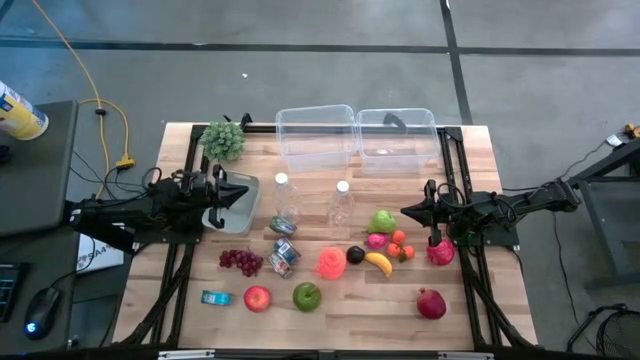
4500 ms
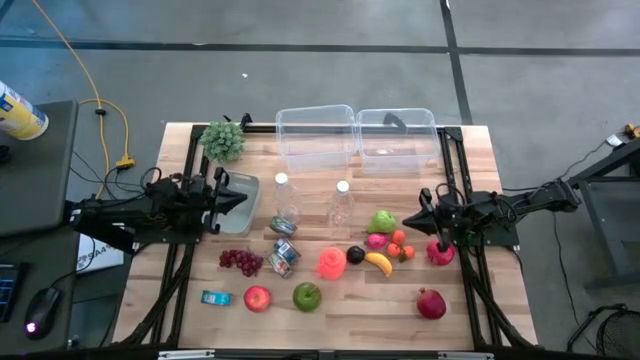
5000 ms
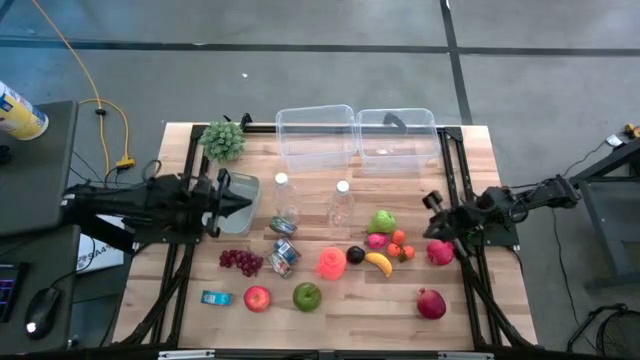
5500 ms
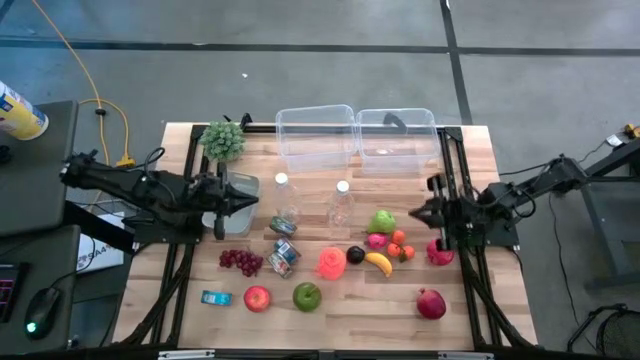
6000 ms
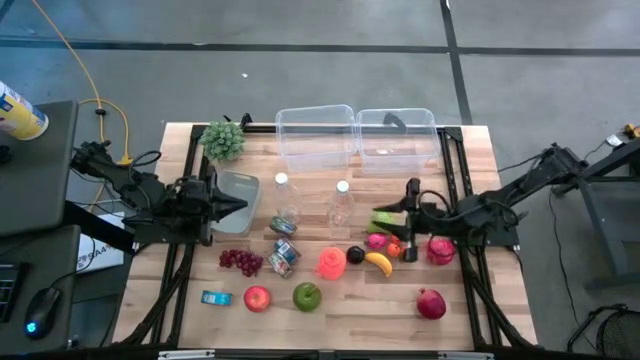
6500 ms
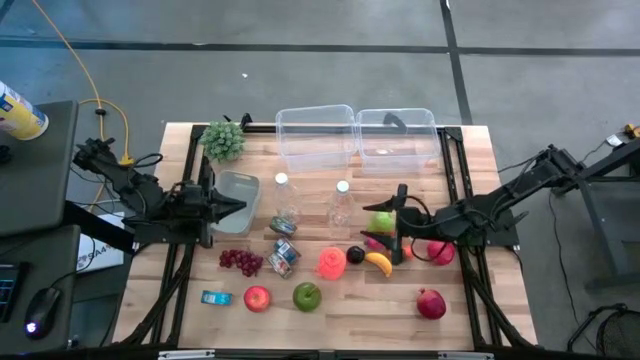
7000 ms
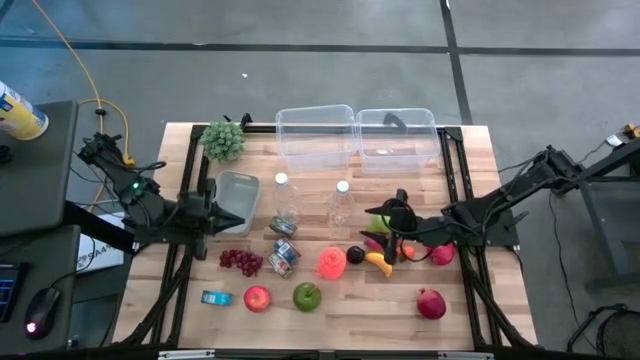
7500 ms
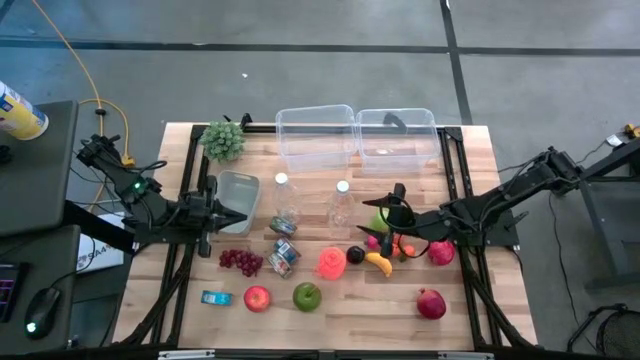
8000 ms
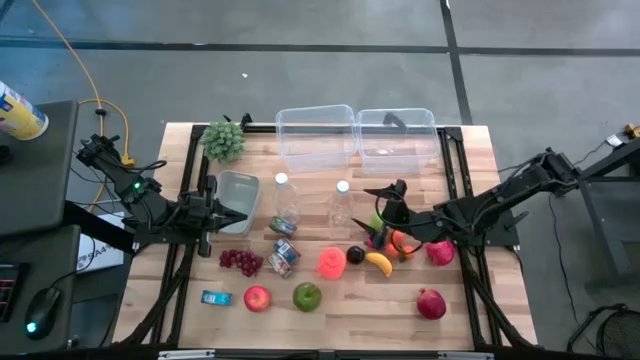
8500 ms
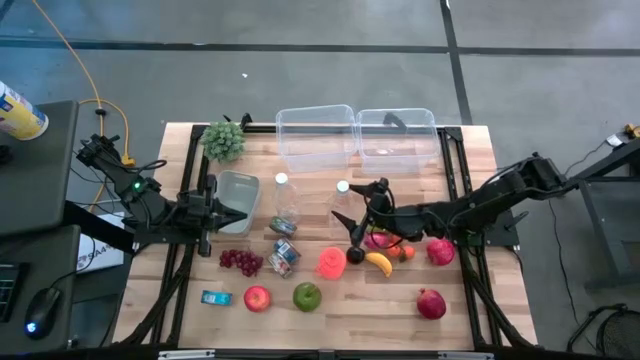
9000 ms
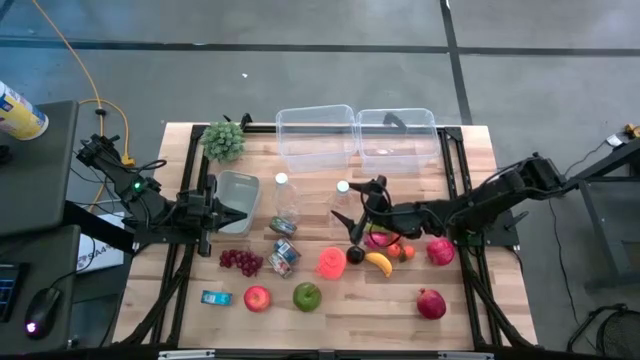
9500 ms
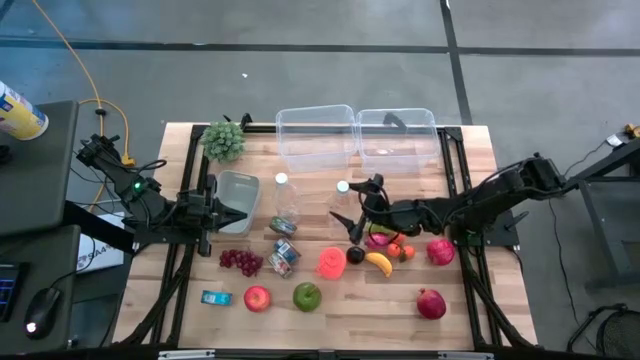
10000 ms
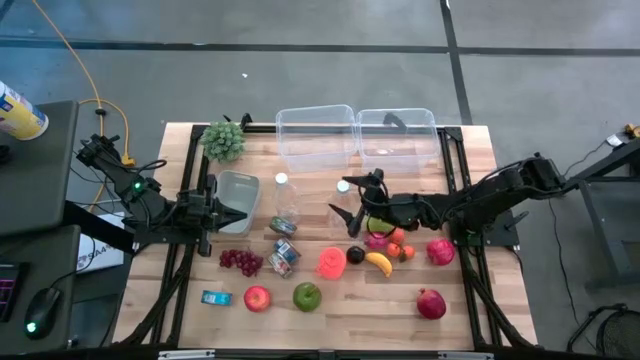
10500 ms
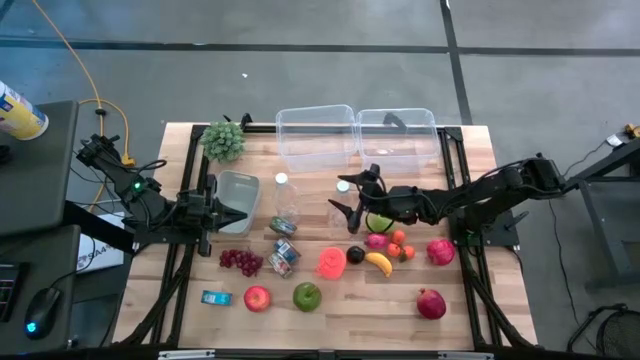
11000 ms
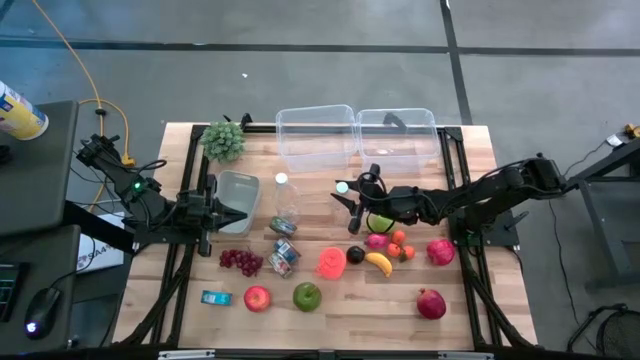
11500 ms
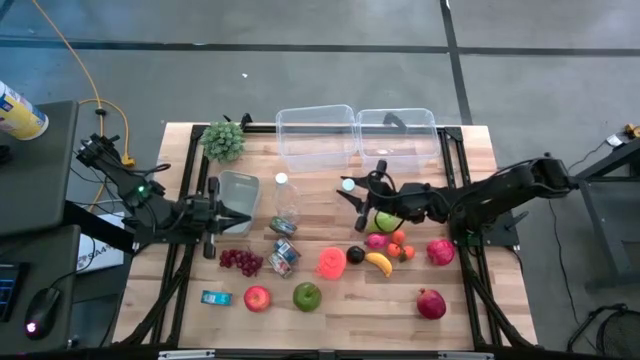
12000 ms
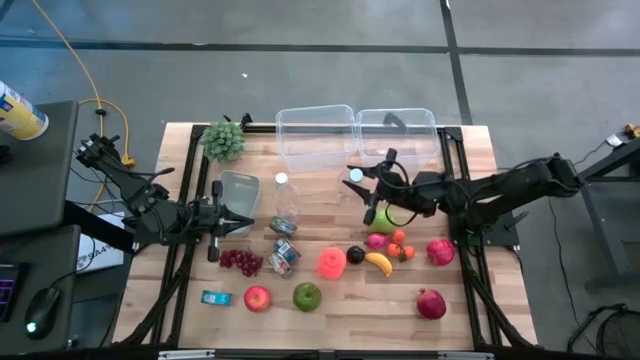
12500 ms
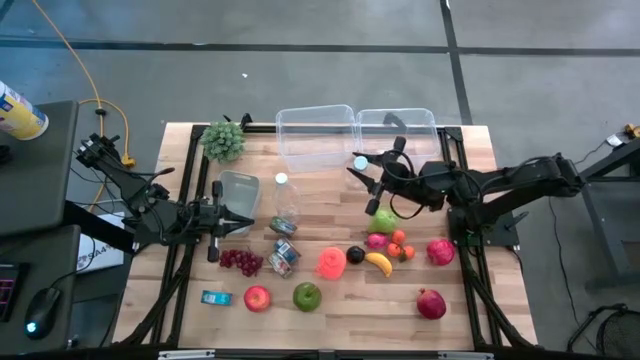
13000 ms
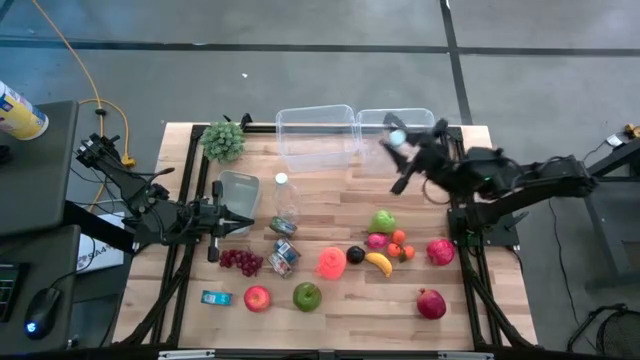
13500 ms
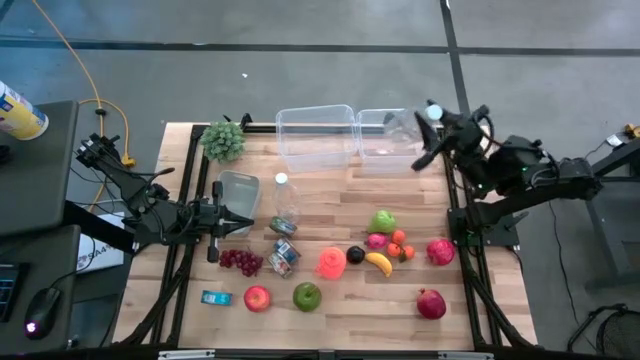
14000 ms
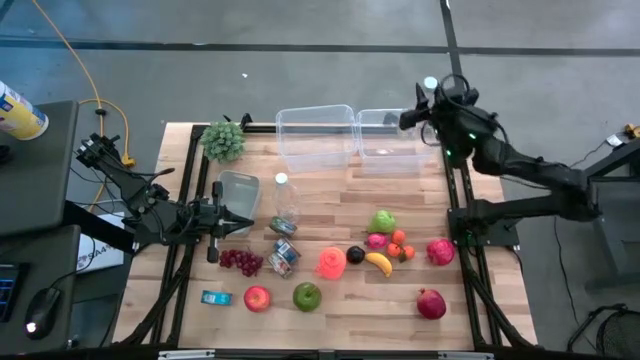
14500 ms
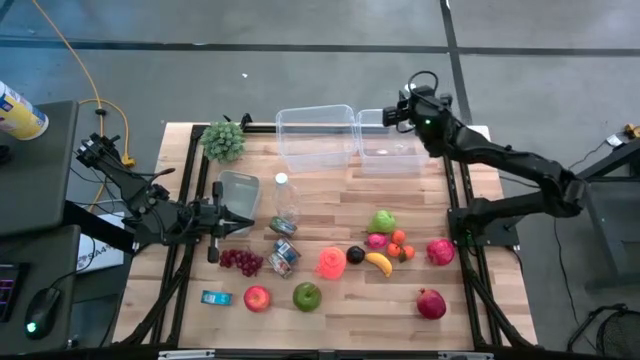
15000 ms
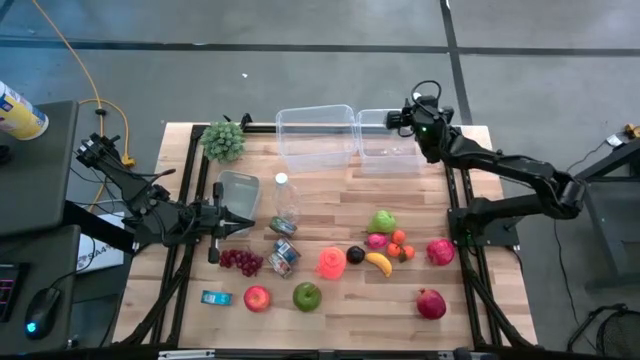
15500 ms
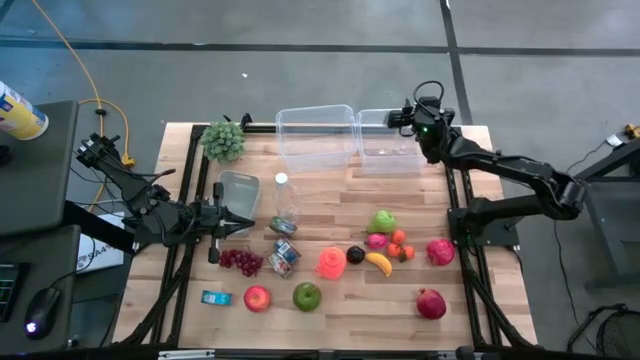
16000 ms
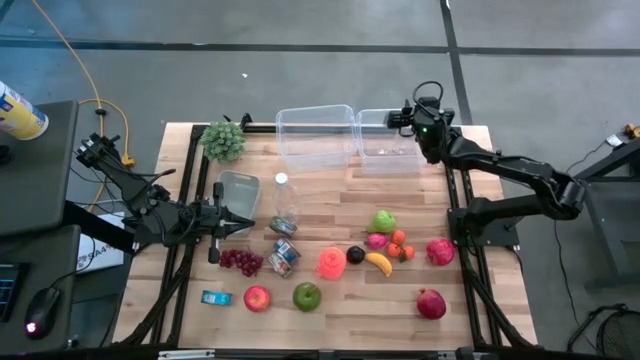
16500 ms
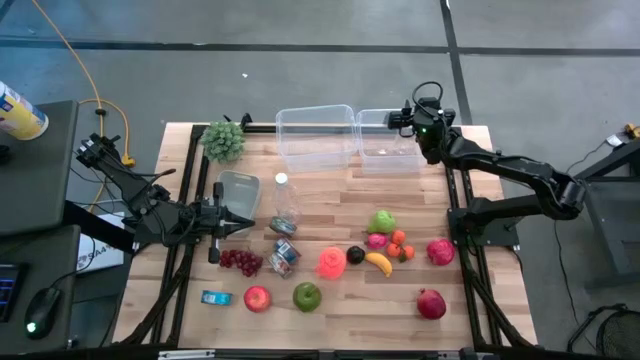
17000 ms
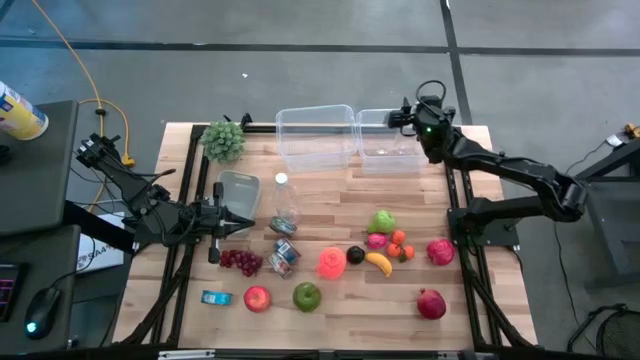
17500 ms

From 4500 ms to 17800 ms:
Task: Pick & Place Food Item
Put the right transparent bottle into the right transparent bin

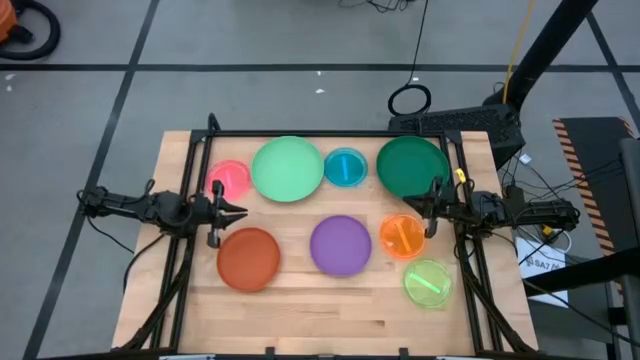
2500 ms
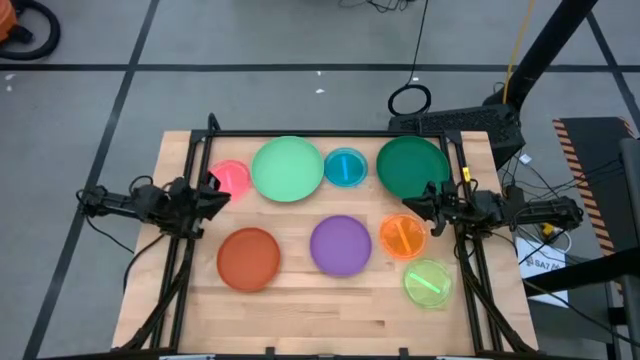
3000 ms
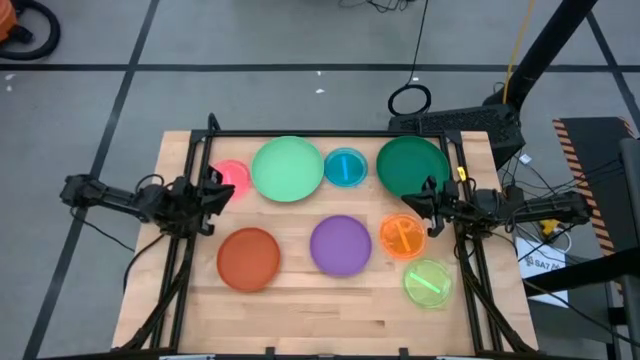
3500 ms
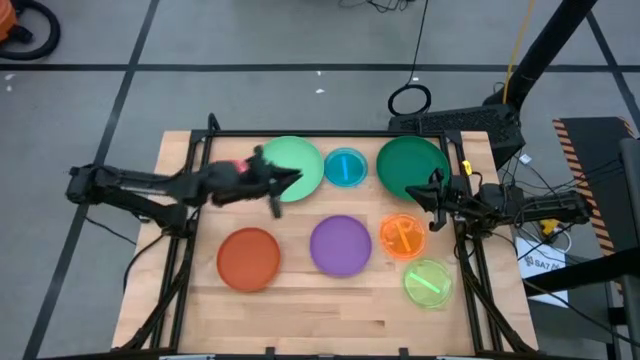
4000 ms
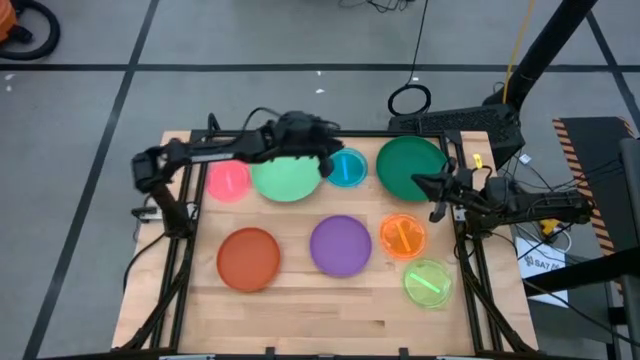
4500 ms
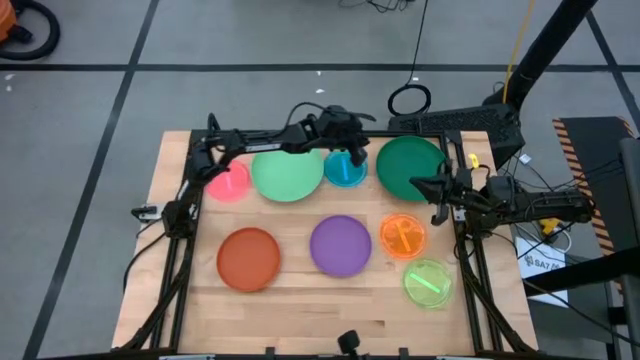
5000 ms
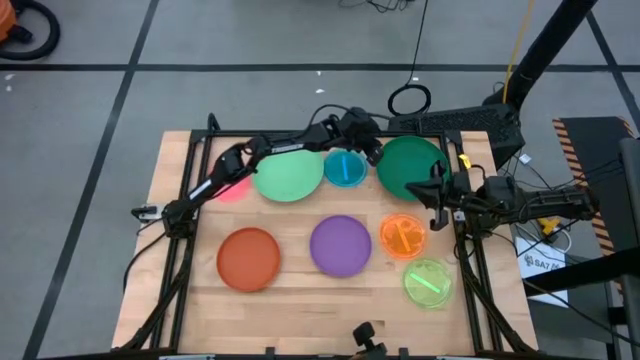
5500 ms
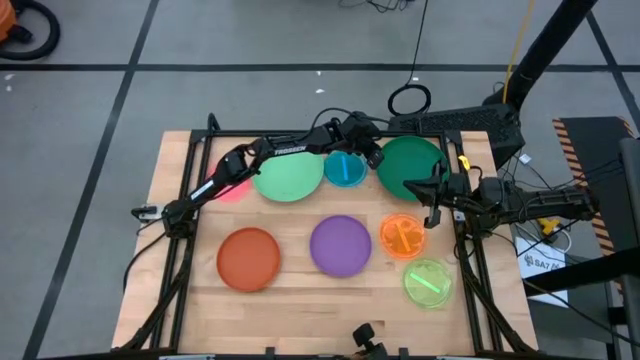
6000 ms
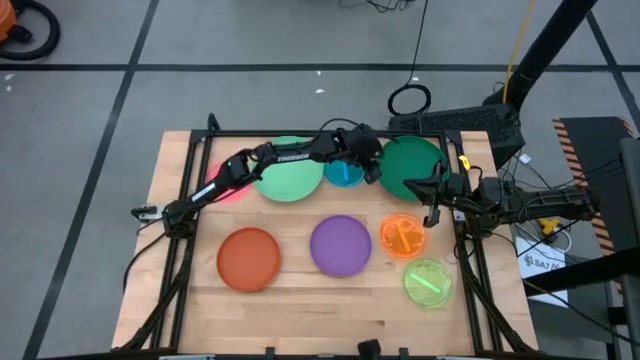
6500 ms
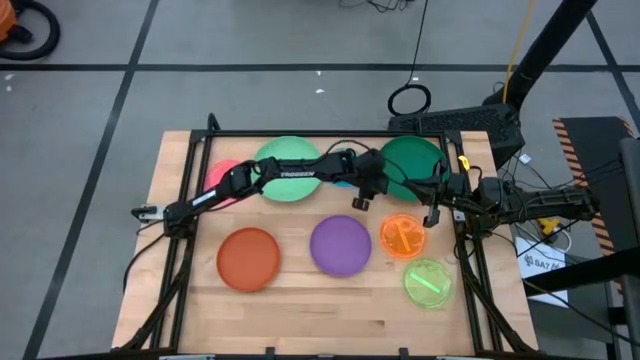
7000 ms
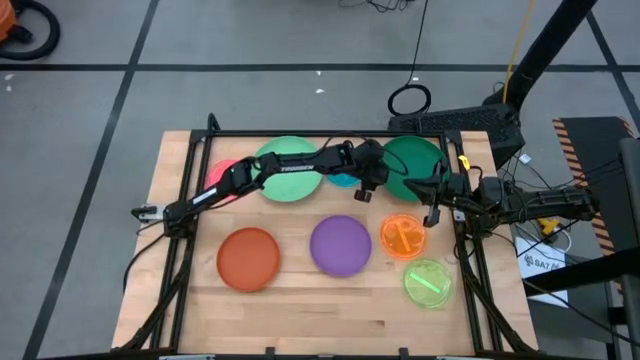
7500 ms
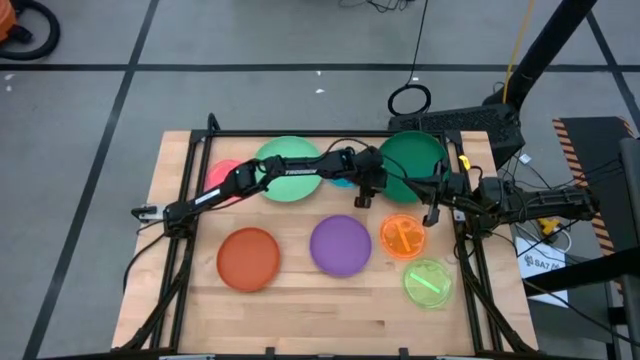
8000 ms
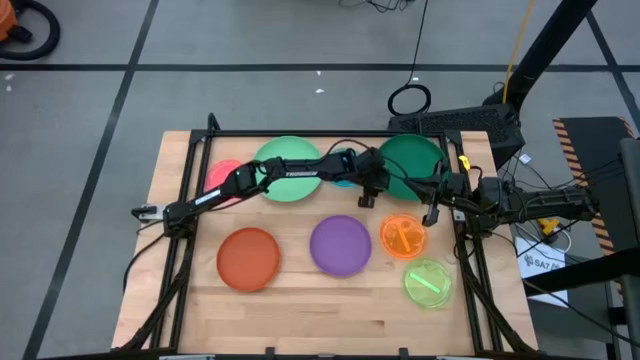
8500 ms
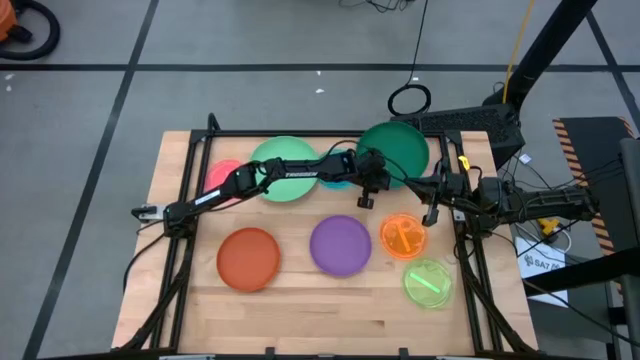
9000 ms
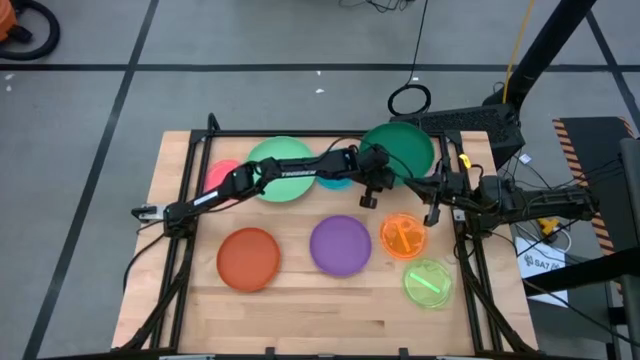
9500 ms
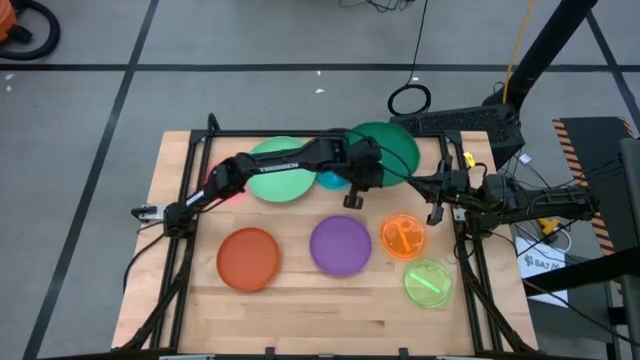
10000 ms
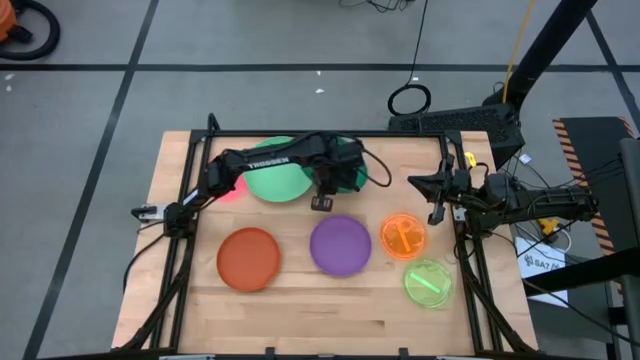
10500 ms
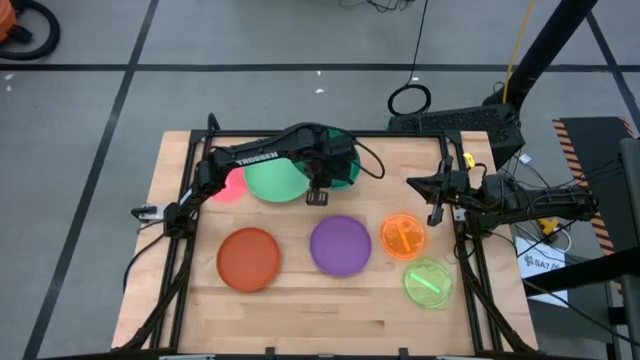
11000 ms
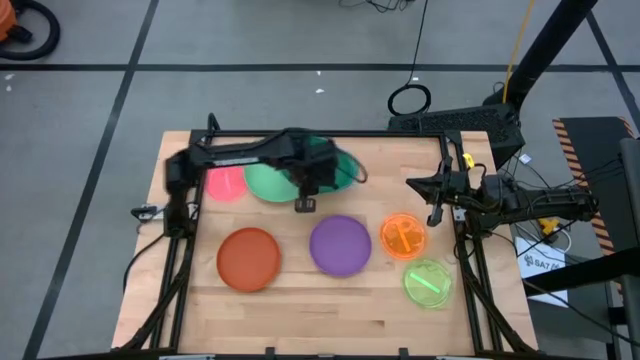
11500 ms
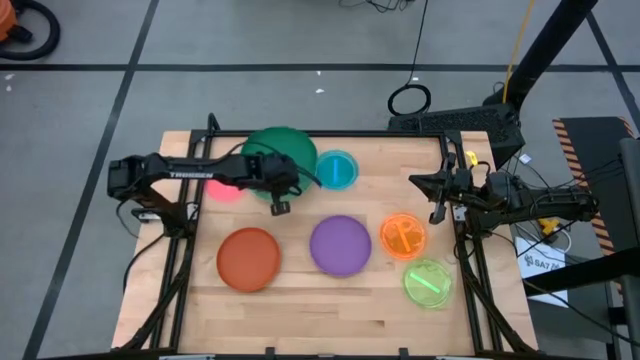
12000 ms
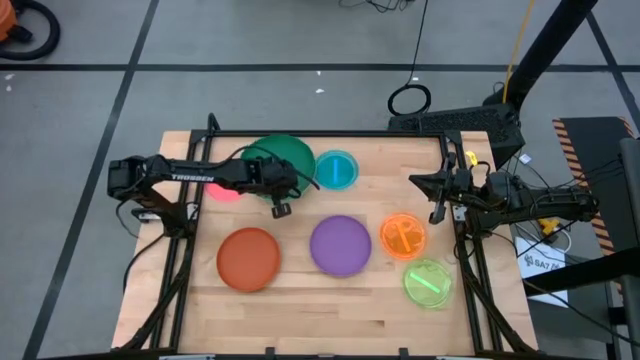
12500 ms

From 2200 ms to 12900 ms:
Task: Stack plastic plates
Stack the dark green plate on top of the light green plate
